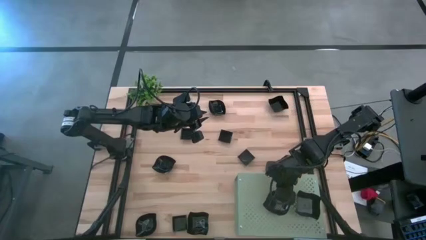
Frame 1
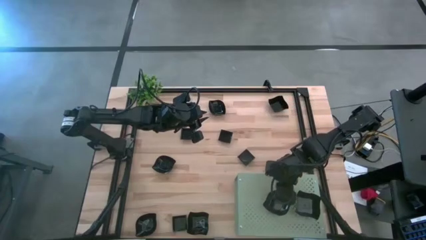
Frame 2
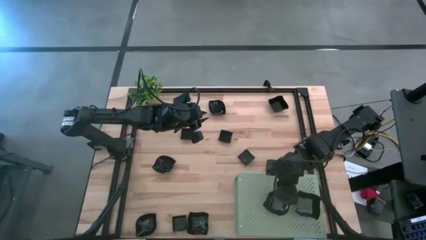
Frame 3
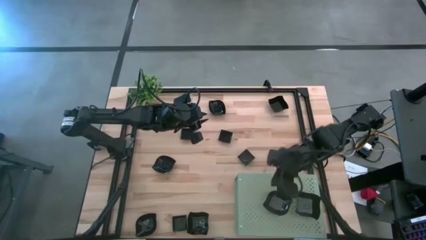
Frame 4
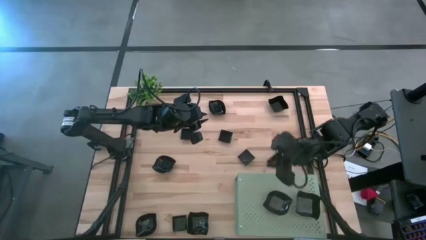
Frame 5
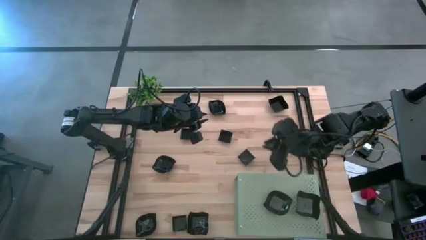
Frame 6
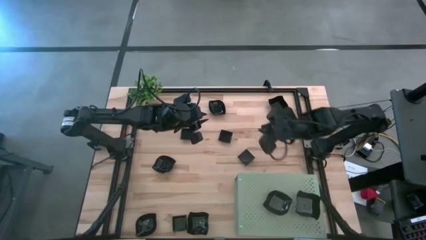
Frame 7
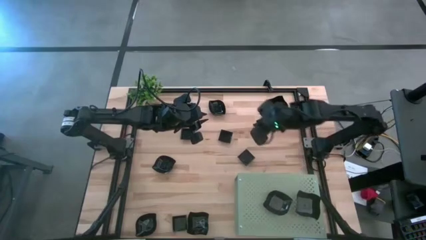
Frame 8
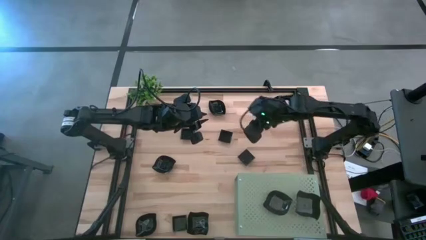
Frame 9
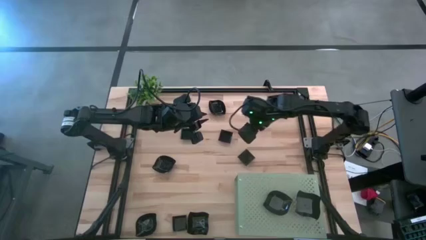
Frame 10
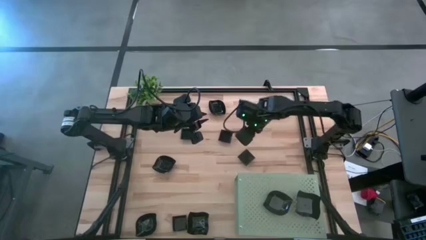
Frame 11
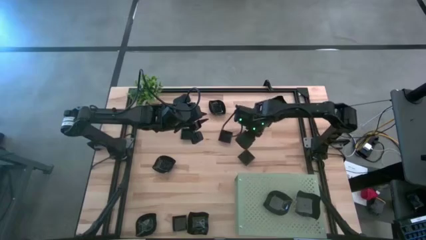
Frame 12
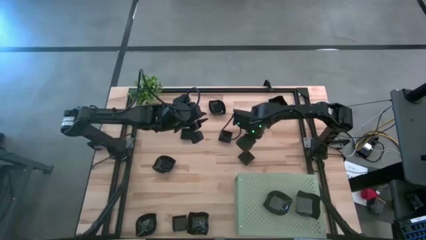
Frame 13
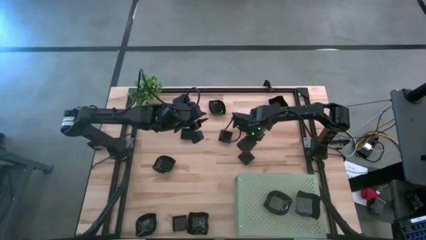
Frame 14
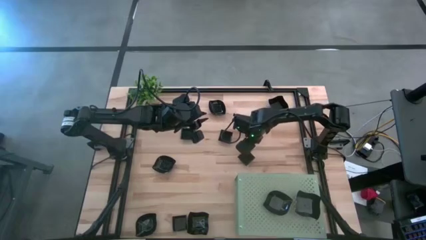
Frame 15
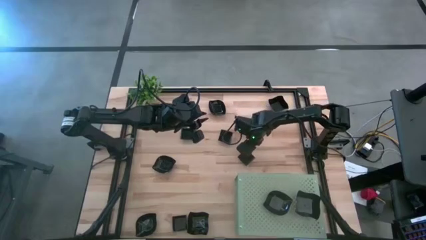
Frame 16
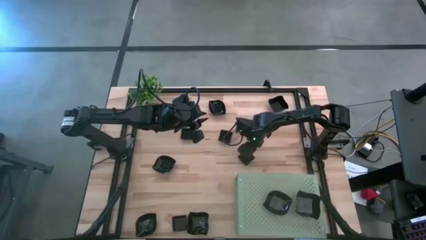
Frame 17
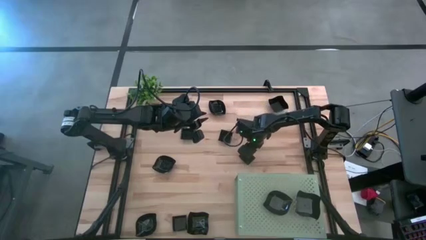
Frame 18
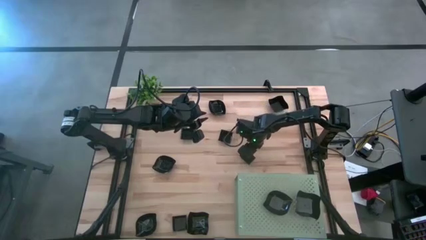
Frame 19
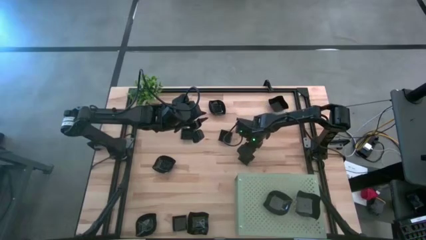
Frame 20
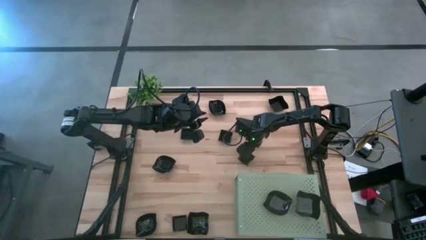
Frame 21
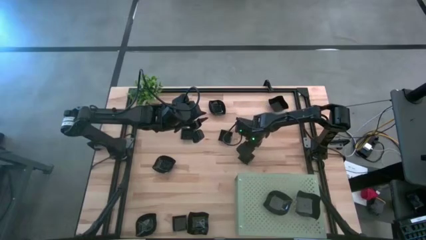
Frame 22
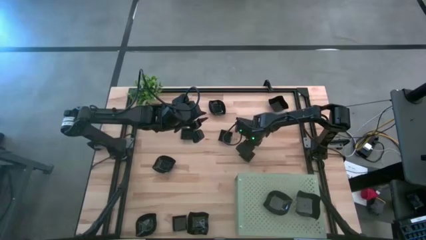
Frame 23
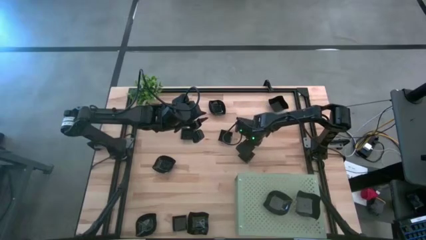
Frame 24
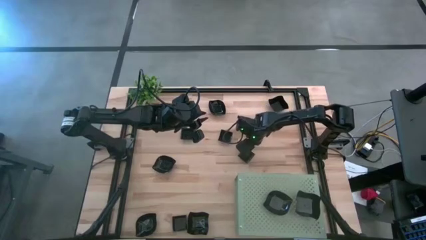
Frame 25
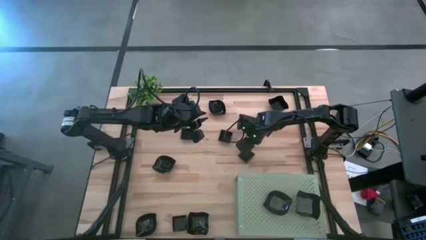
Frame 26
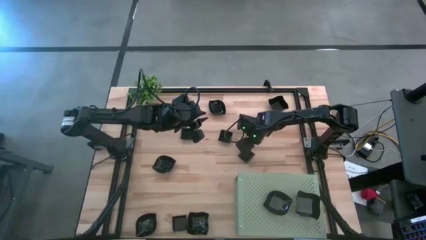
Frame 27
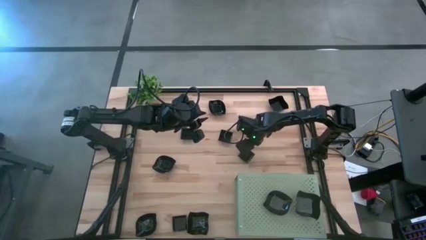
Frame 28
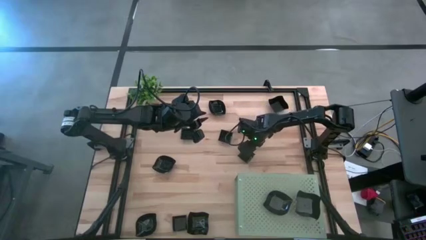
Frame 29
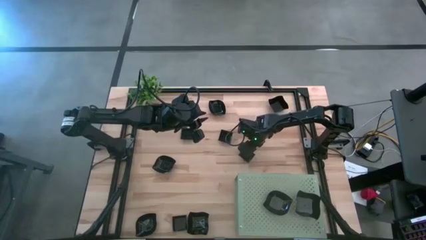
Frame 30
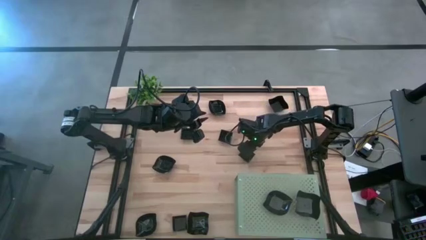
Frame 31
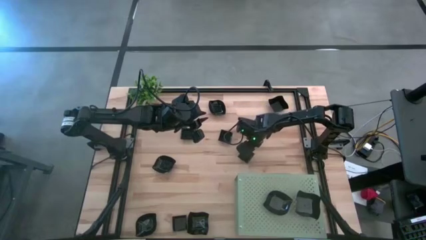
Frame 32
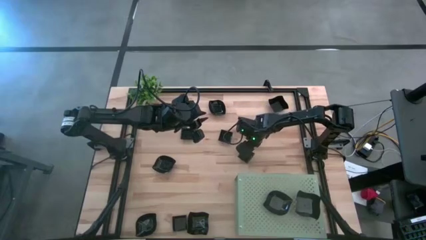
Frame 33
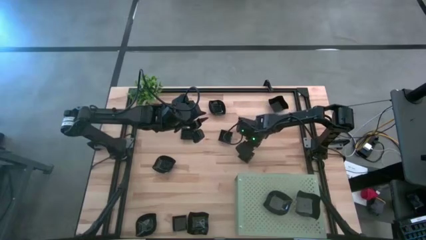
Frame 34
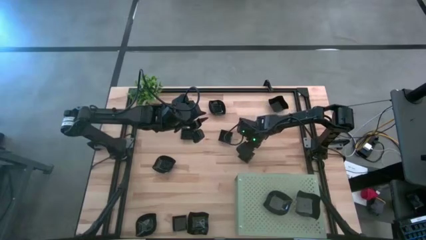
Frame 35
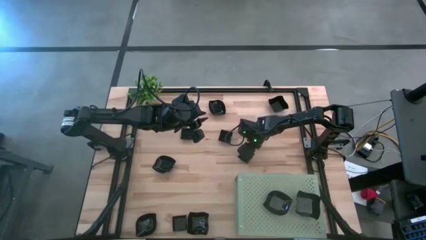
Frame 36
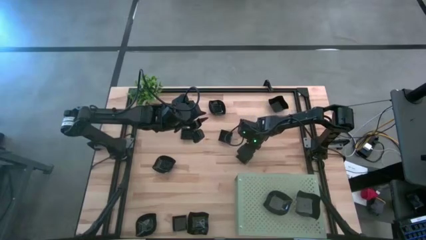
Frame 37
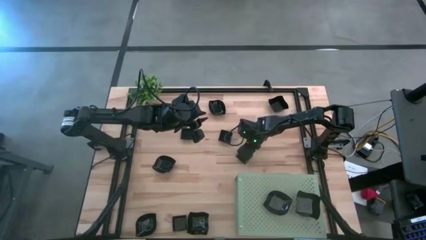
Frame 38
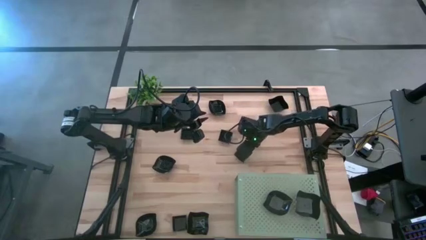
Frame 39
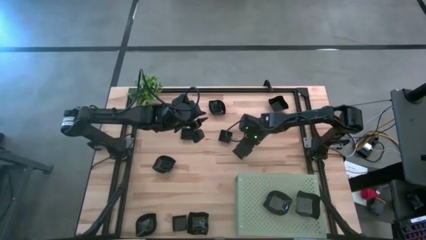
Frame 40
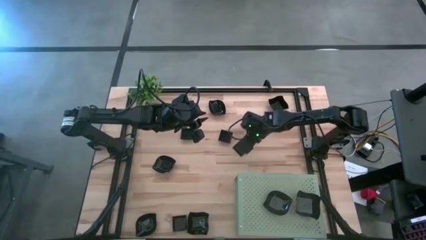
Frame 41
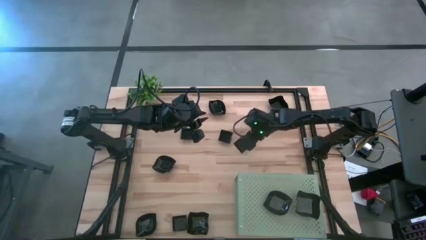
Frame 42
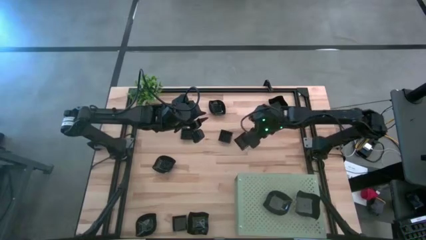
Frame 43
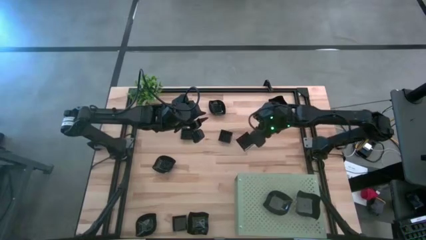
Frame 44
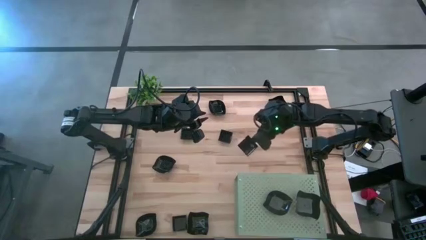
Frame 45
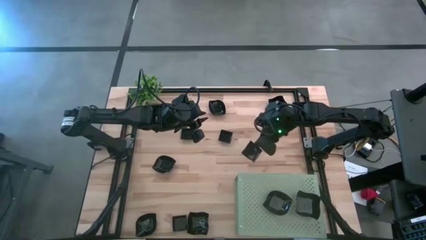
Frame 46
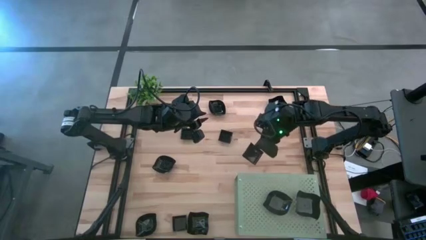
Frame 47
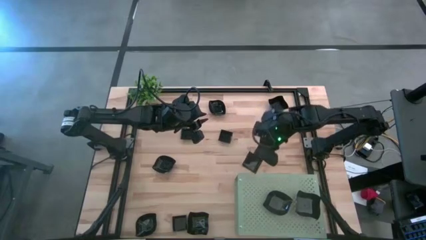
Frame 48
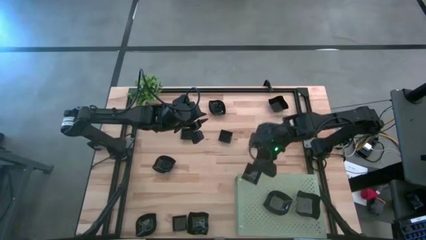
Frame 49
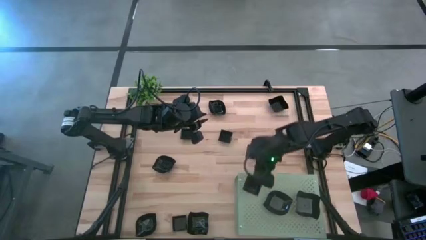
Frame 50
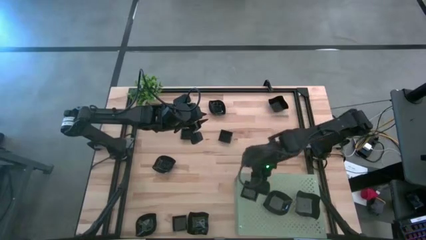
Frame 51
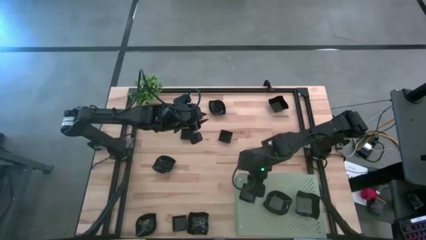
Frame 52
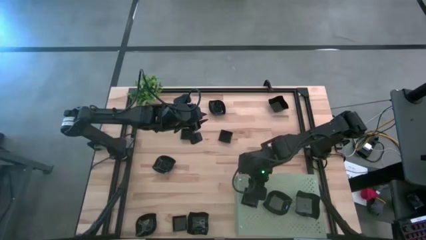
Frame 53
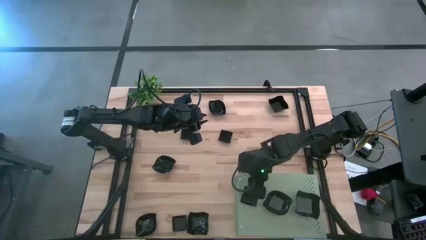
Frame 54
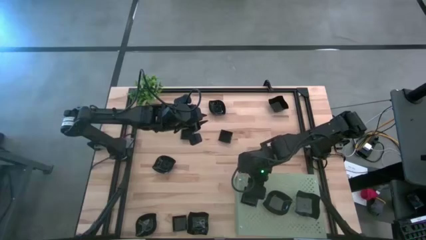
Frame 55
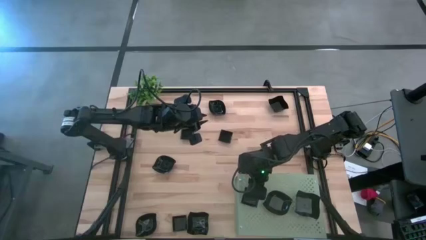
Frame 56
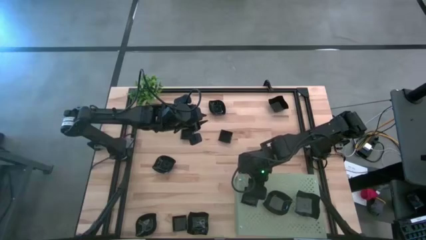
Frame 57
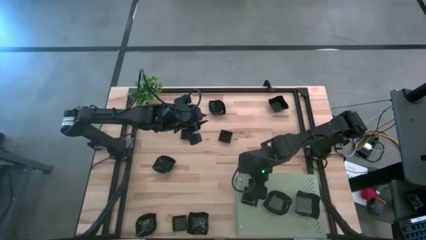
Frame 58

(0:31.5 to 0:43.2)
Task: Pick & Place Mini shaped plates
Put the square plate on the shelf
